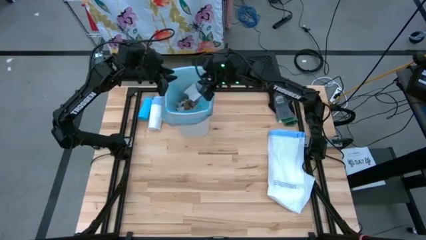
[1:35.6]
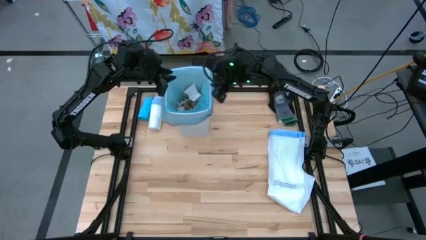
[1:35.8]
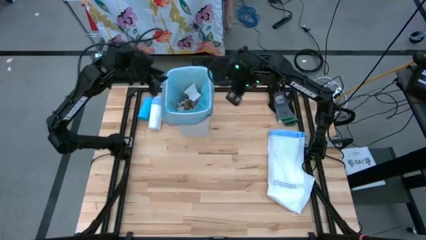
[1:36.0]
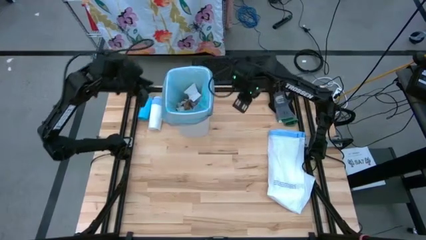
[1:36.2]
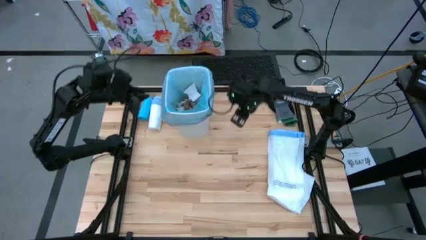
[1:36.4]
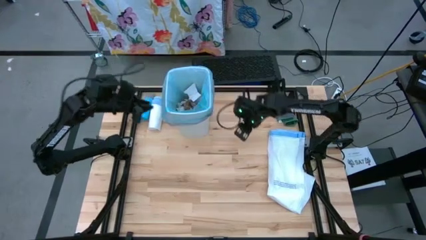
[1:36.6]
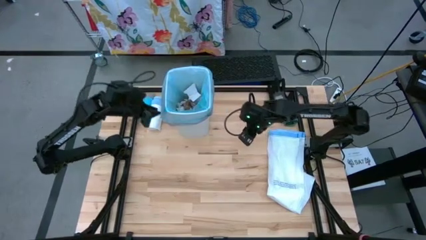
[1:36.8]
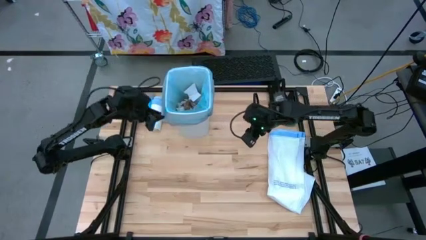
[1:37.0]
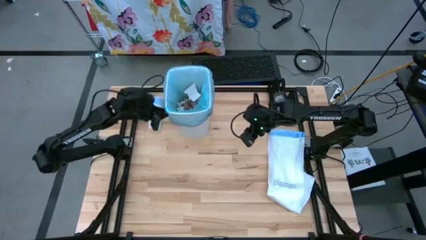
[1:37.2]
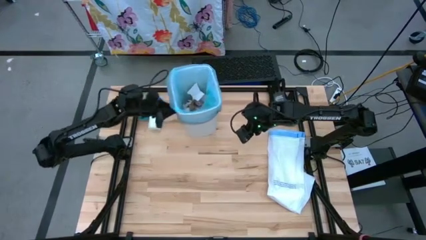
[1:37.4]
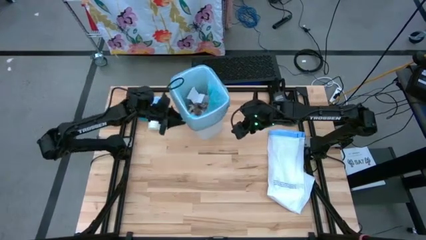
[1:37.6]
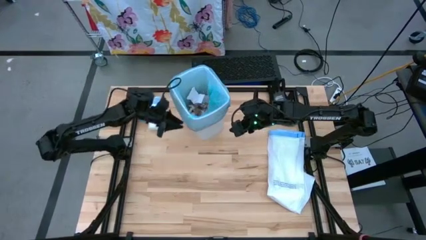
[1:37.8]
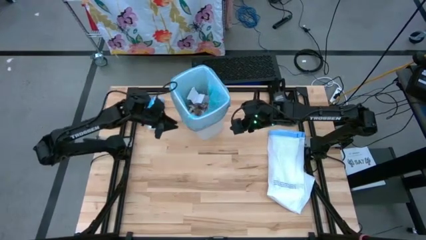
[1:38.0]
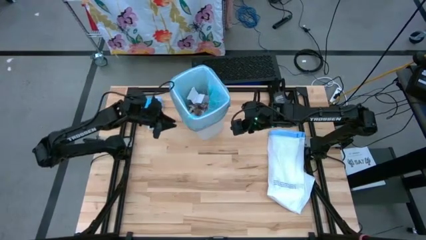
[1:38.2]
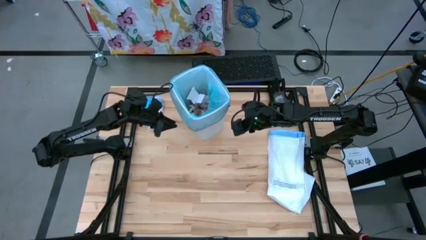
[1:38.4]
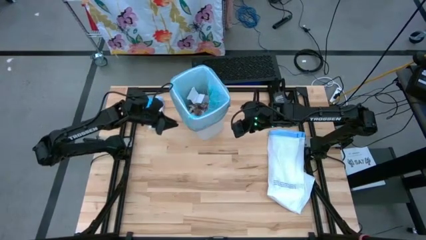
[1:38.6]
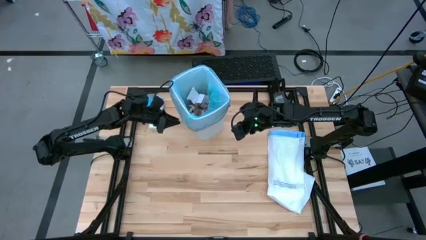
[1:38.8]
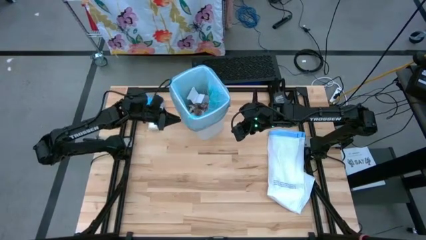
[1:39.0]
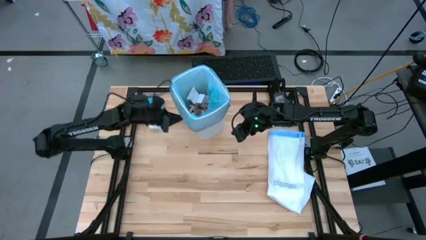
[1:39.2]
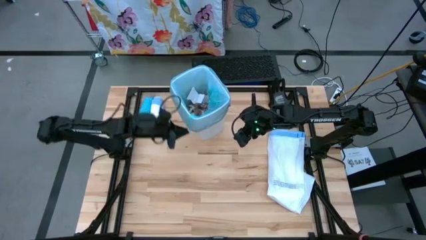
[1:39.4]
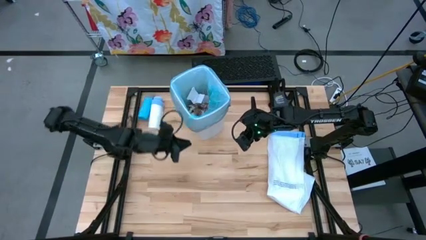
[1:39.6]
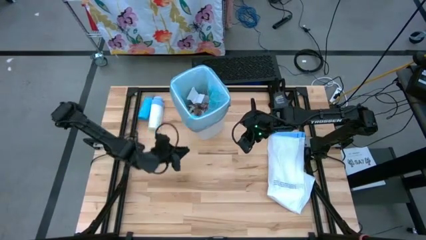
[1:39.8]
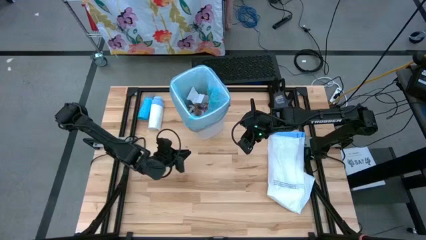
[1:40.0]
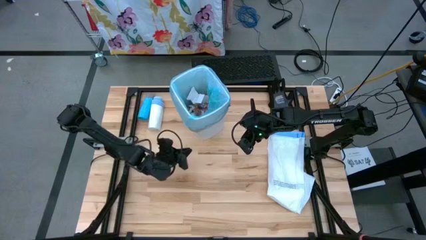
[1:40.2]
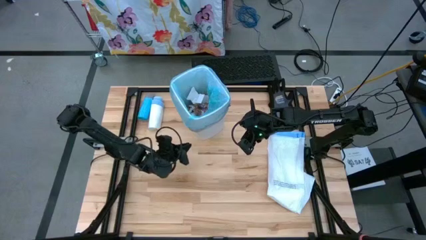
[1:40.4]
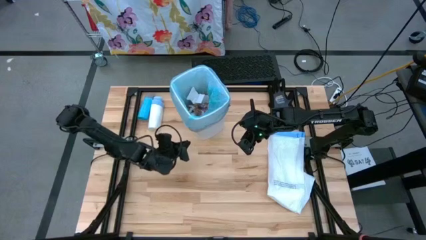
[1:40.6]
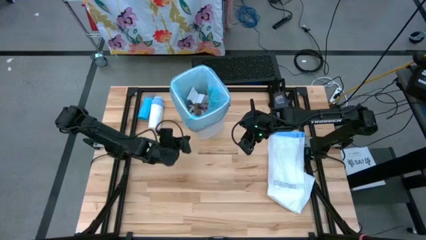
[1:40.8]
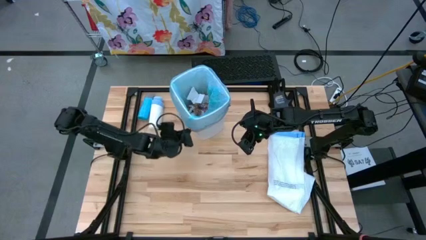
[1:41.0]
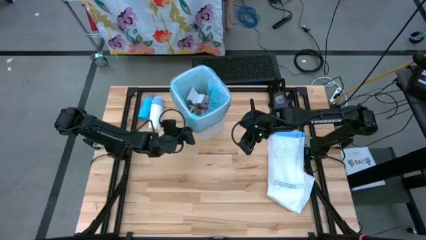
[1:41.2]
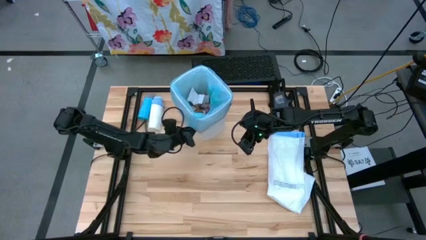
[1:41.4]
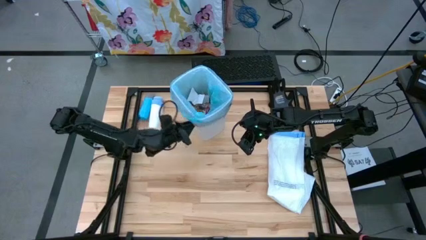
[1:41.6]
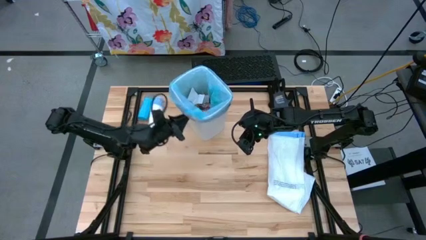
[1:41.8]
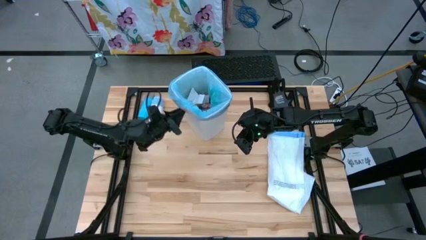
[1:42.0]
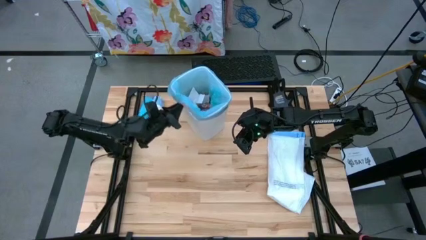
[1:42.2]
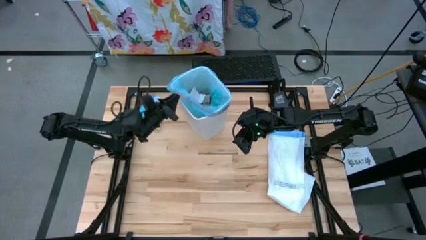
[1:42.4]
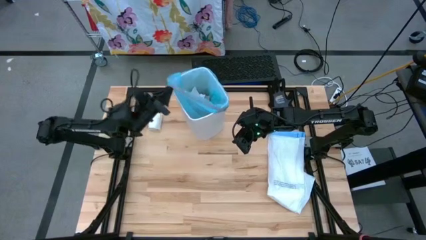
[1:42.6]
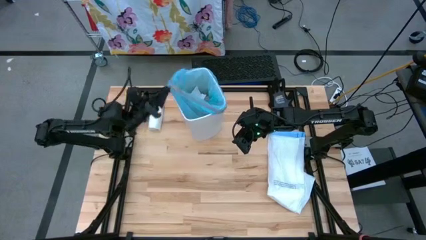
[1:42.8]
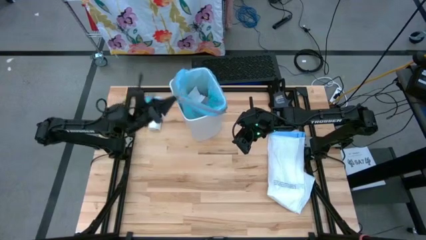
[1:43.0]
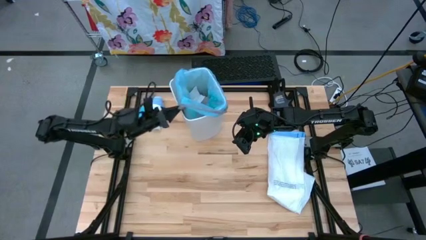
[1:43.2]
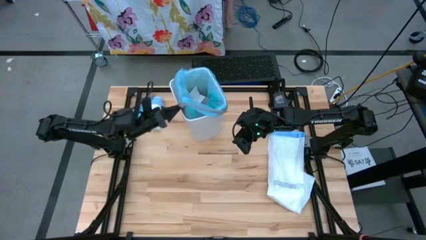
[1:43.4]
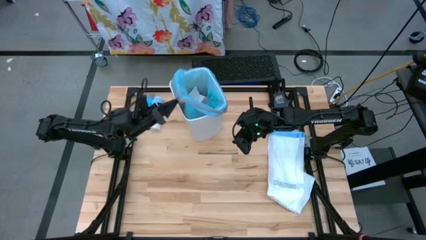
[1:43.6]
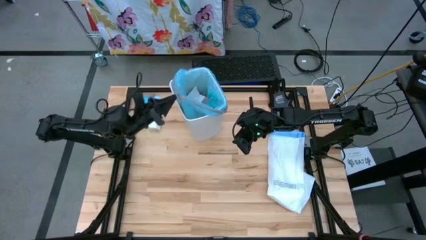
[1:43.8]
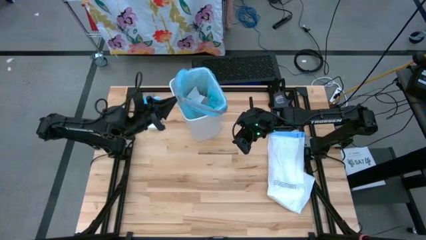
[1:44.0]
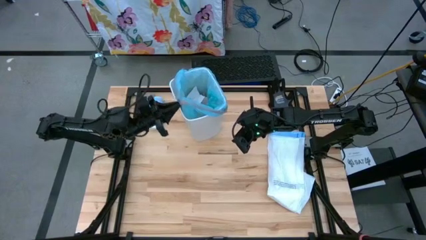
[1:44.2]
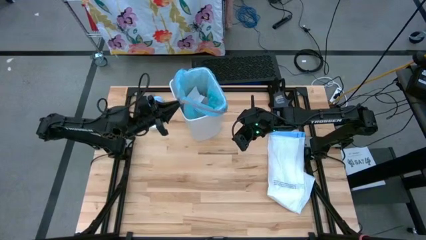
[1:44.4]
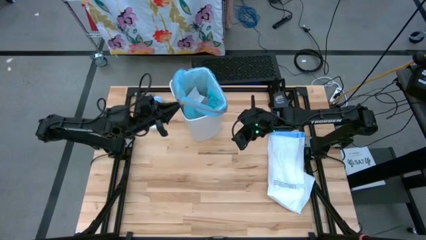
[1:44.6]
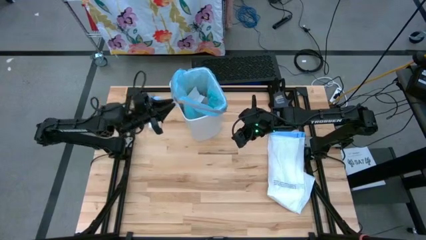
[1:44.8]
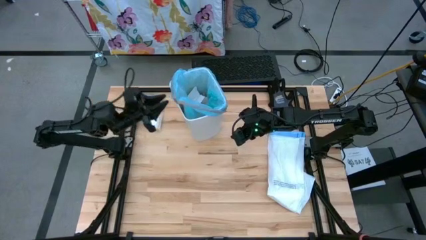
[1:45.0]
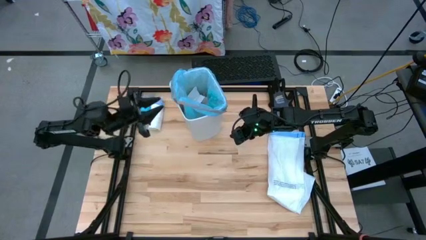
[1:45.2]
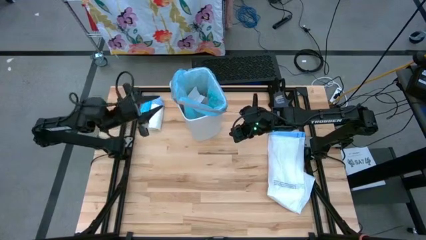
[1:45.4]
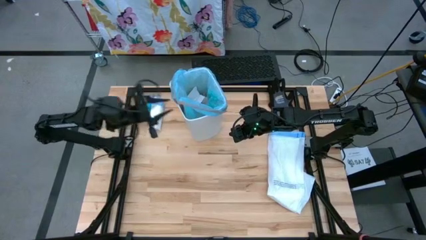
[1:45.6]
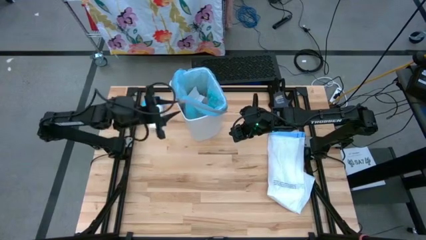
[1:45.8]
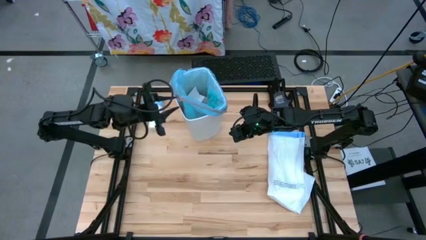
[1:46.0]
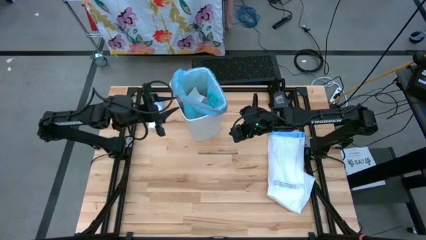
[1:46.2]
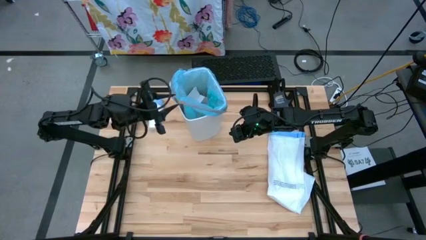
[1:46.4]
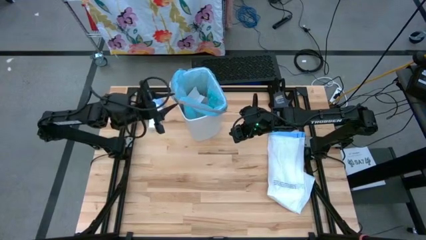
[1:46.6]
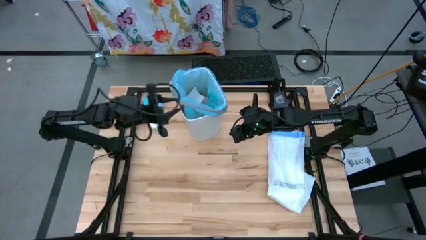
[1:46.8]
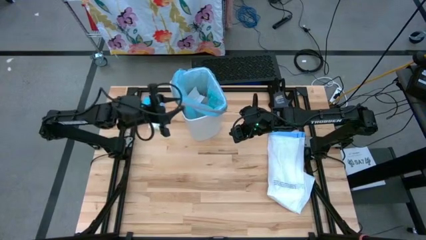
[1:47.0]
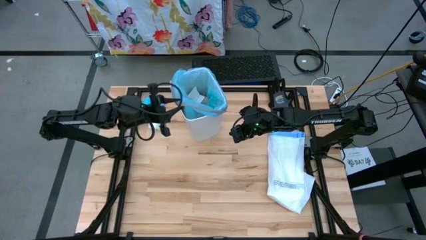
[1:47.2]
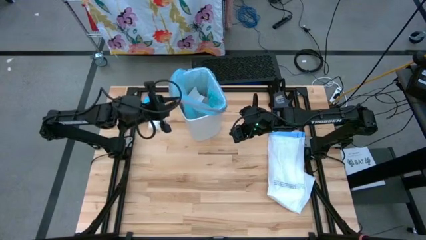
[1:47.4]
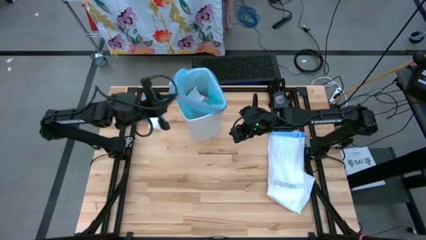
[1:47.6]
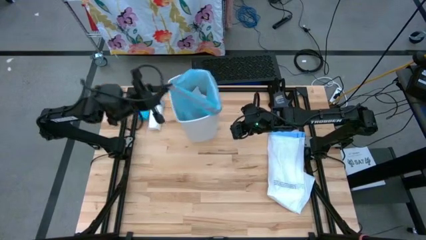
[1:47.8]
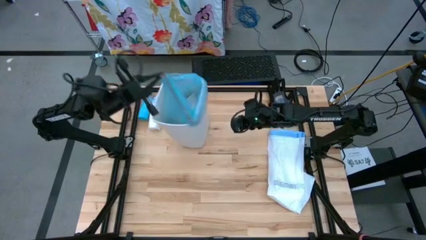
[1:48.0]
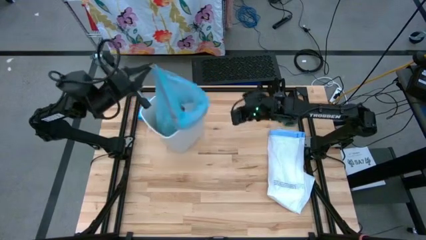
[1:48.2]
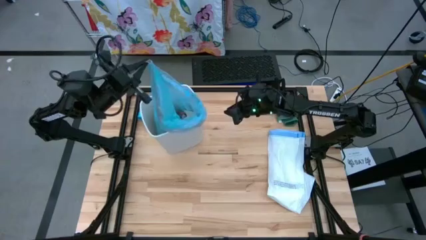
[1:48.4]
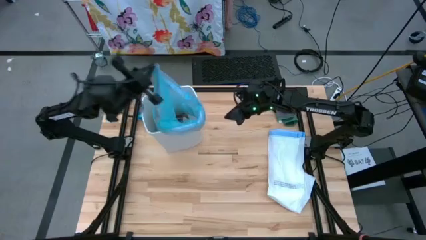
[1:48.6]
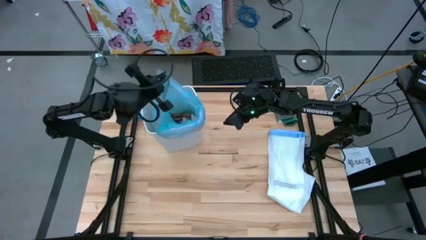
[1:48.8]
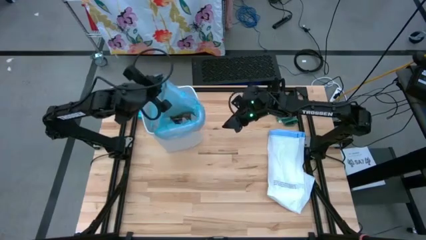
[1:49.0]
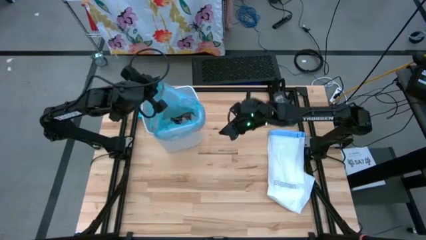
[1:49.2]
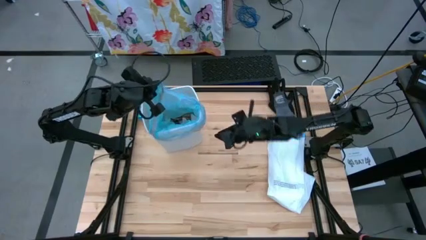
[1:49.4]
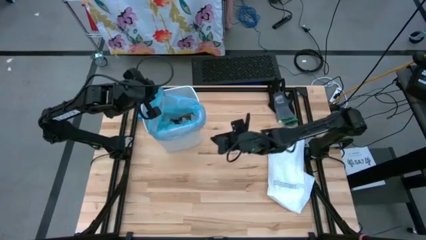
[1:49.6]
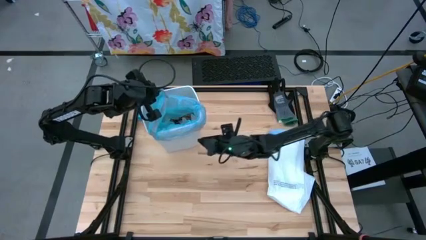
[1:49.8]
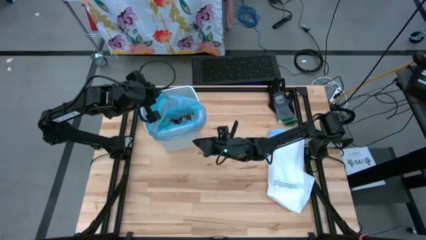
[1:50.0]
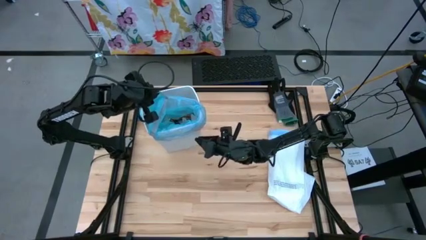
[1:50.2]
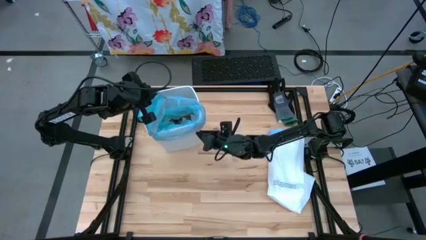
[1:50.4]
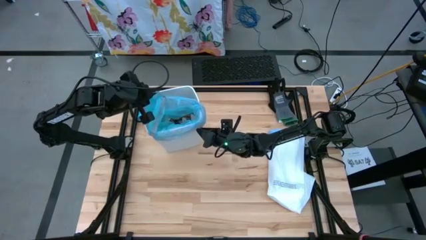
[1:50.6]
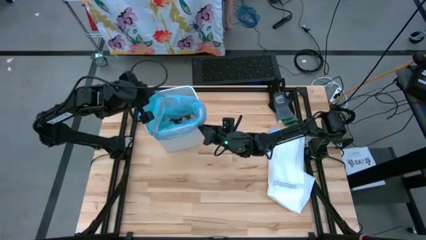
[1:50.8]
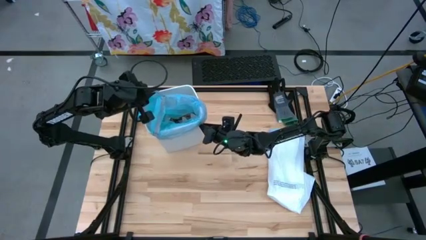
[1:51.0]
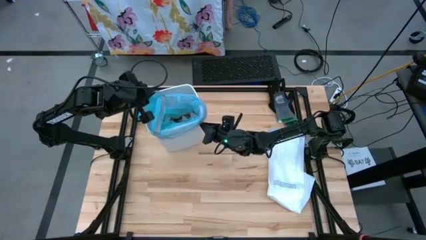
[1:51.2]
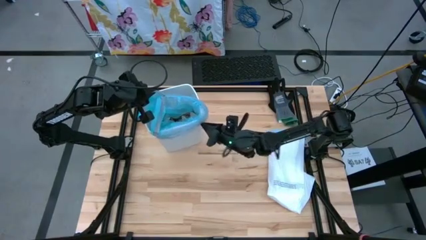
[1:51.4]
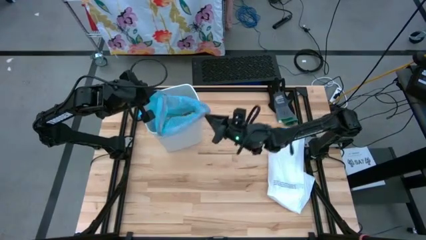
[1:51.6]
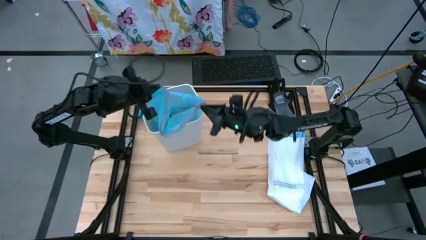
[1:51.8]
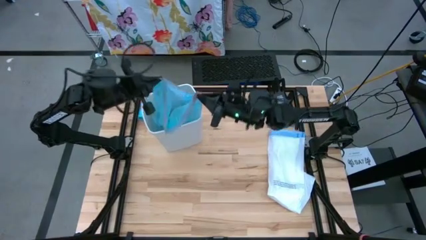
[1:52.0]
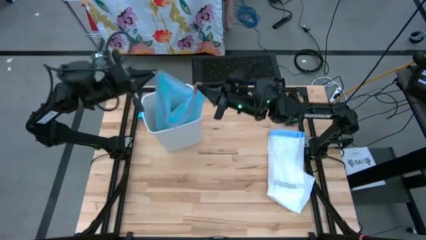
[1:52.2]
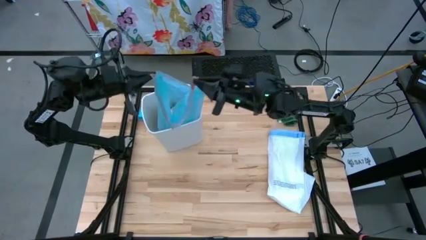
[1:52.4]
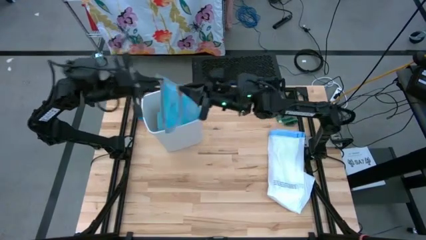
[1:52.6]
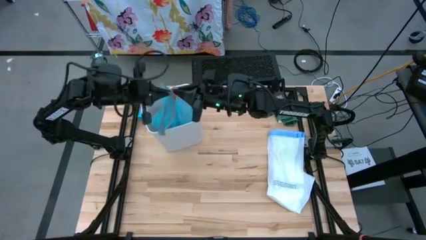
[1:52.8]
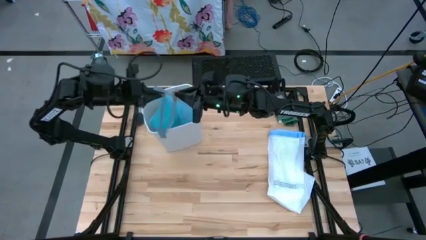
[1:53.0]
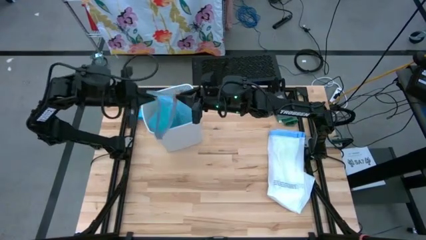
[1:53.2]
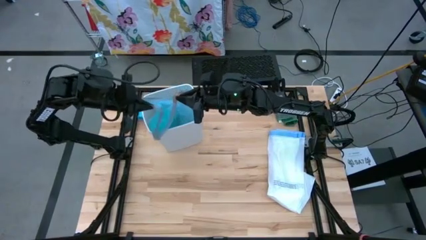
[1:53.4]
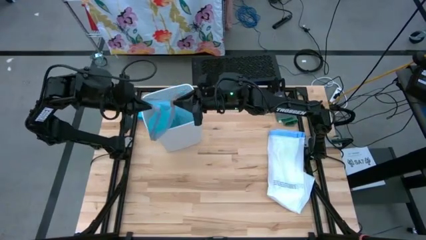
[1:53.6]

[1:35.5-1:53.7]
Task: place trash/remove bag and relplace
Remove the blue trash bag from the white trash bin
